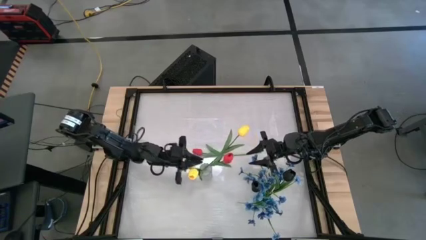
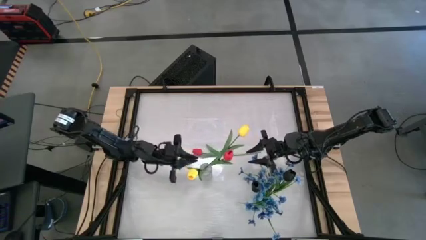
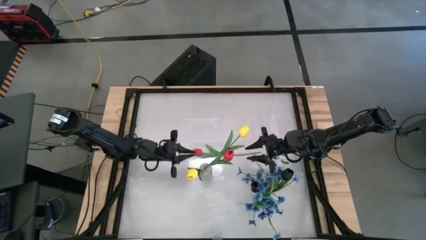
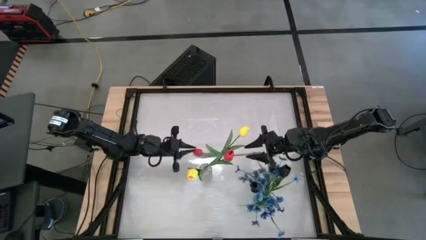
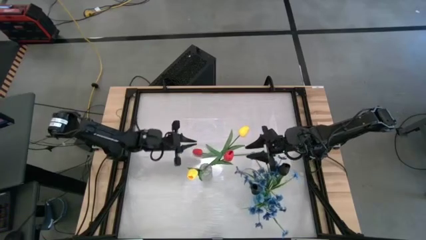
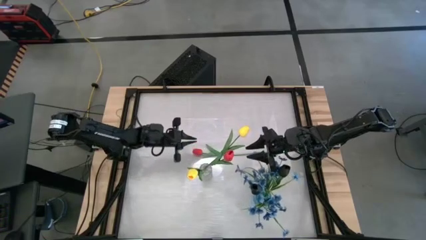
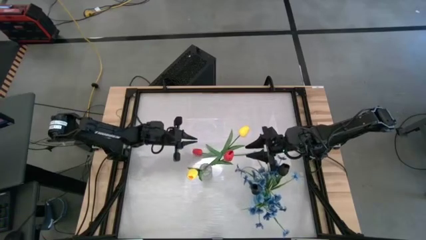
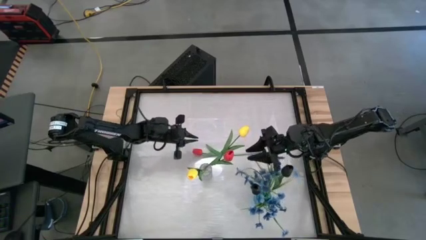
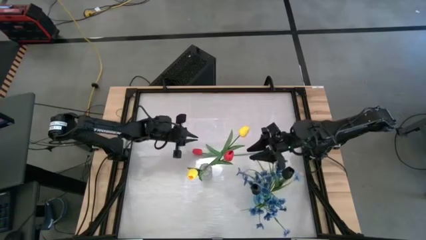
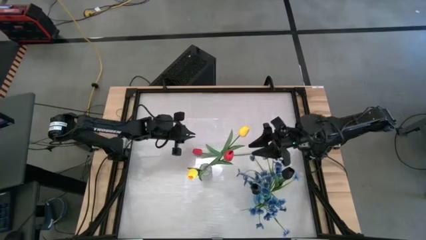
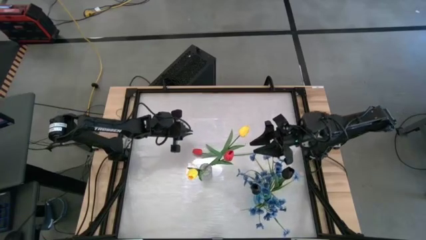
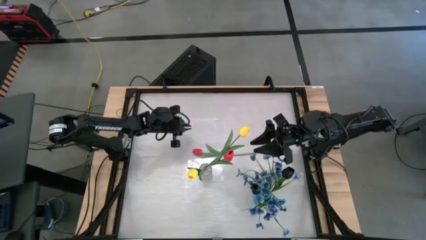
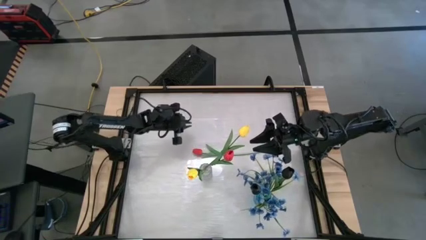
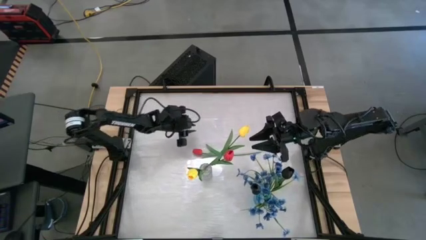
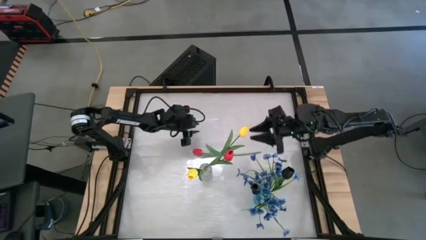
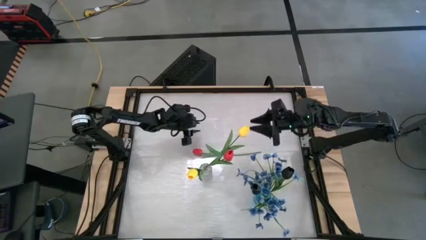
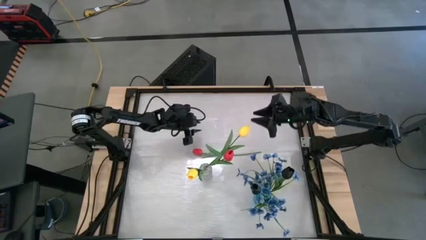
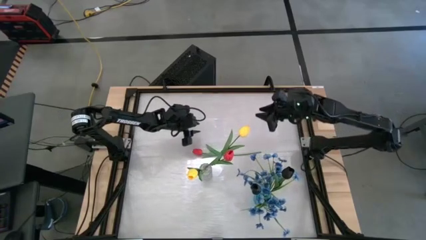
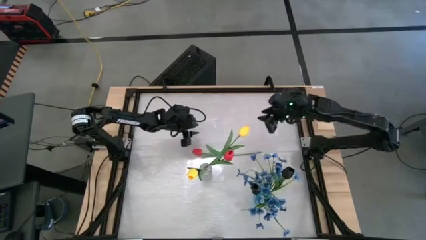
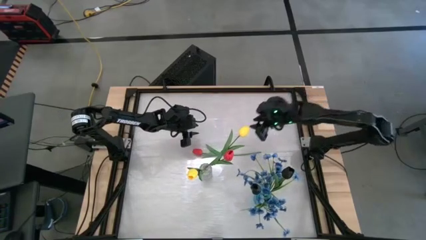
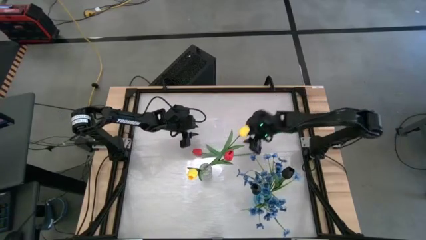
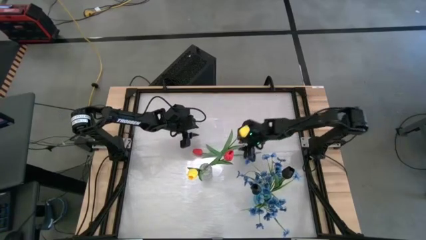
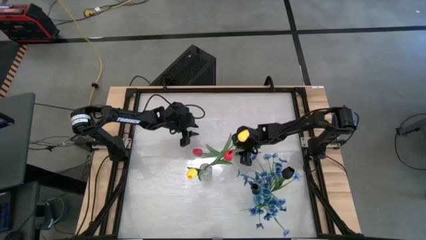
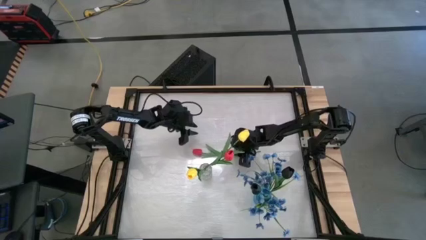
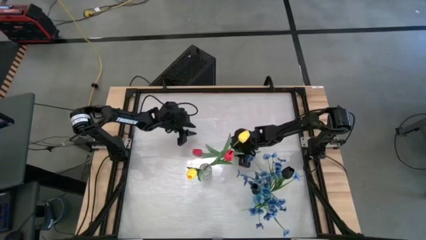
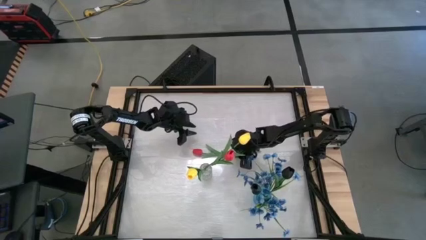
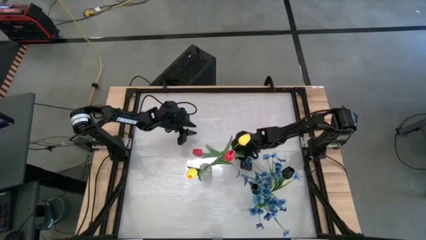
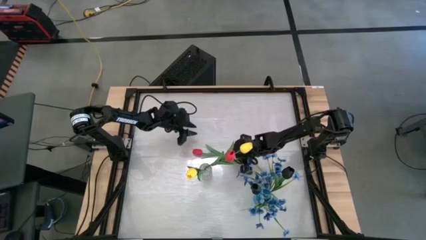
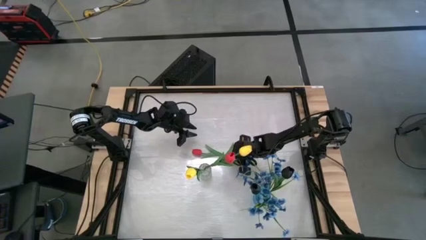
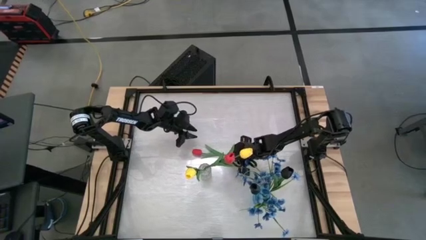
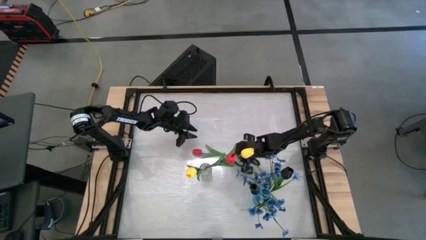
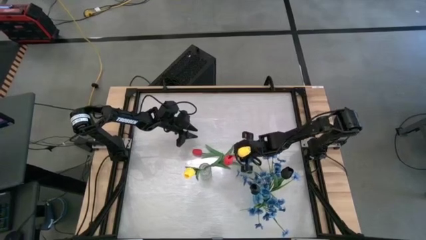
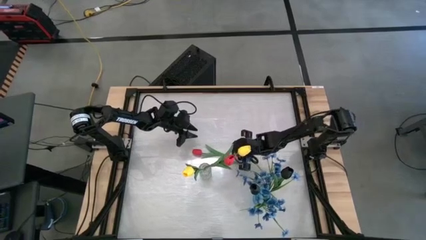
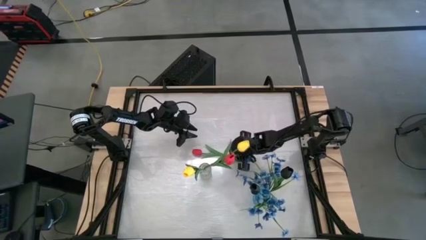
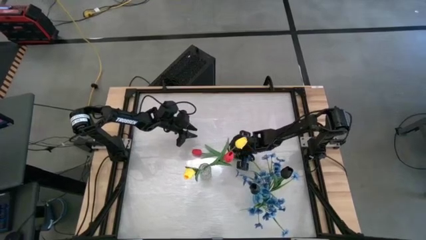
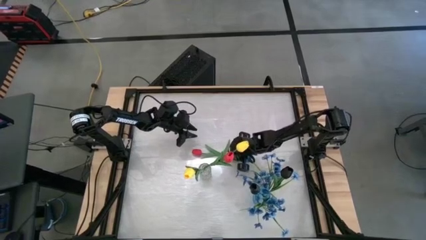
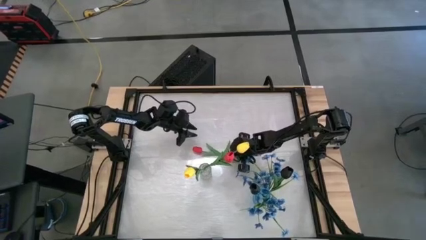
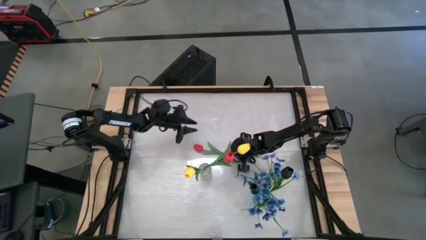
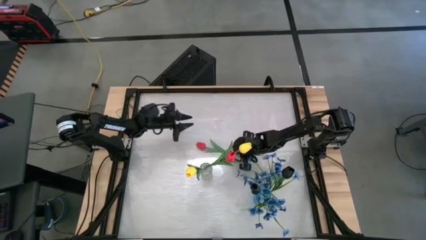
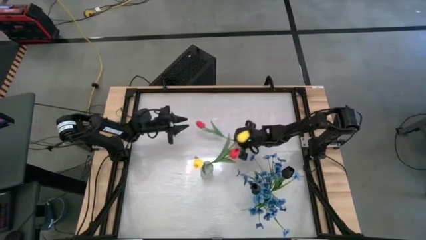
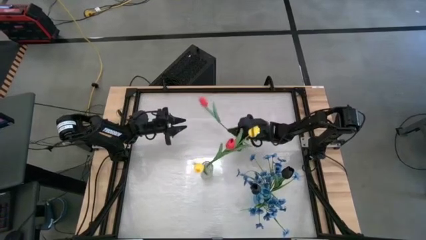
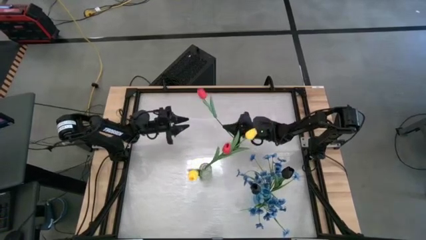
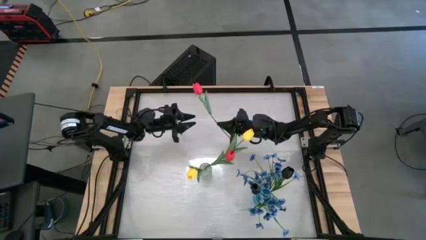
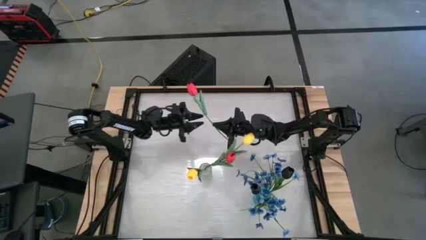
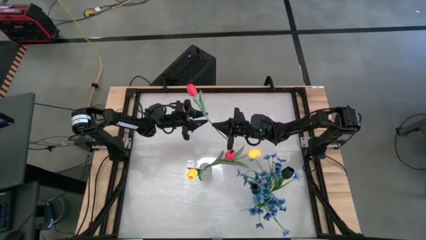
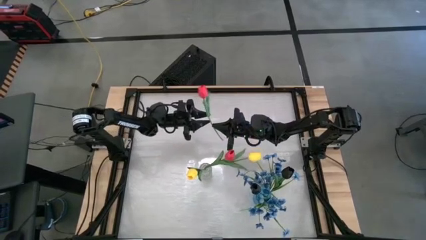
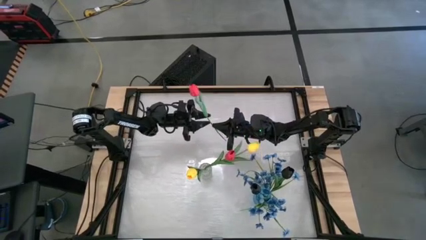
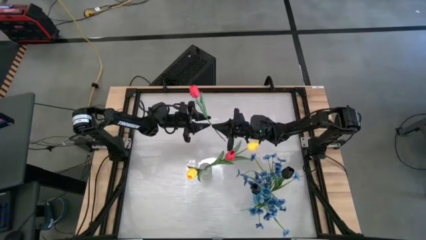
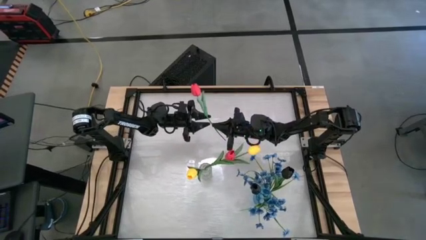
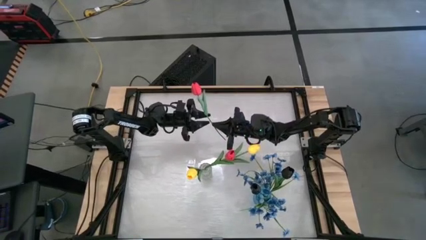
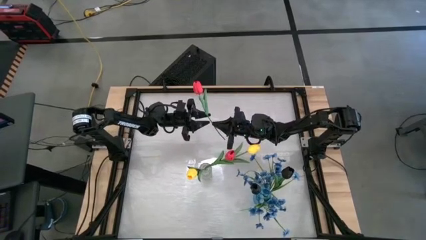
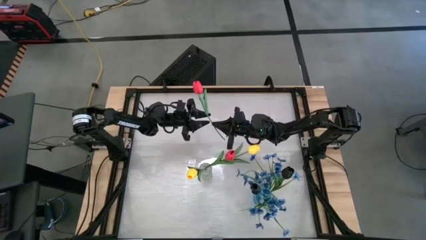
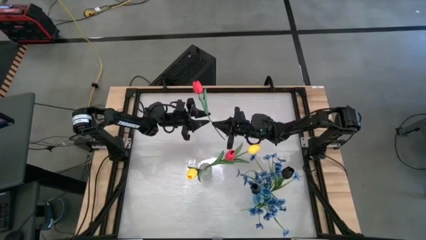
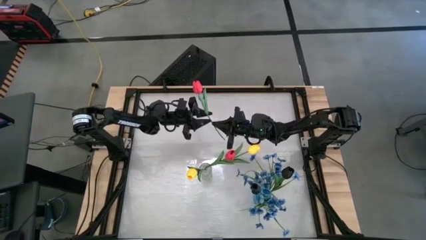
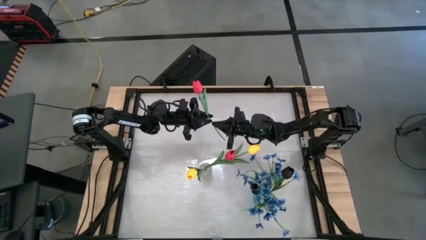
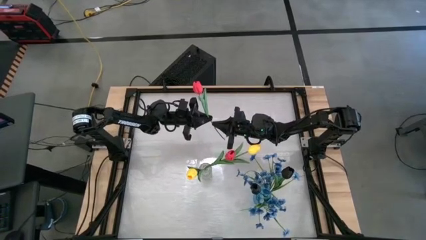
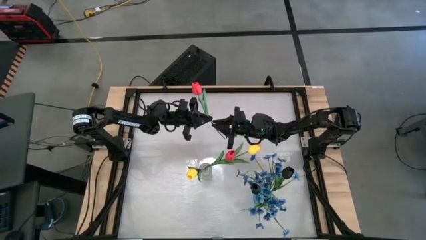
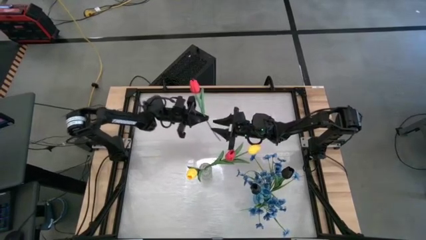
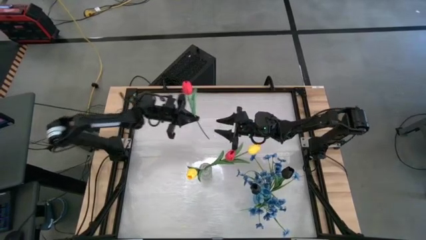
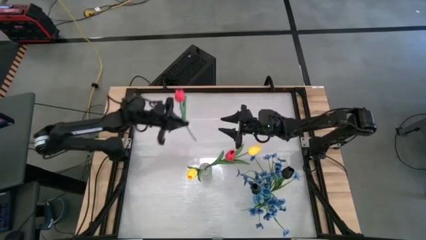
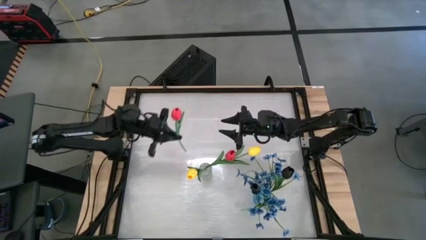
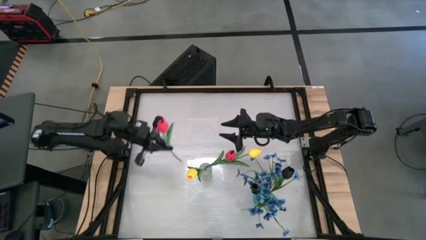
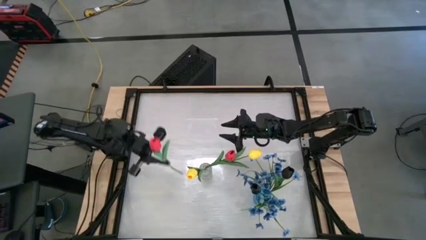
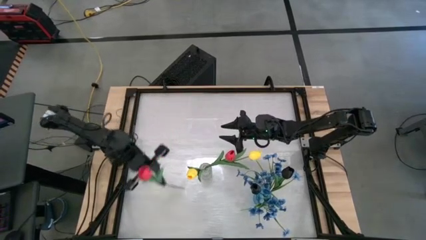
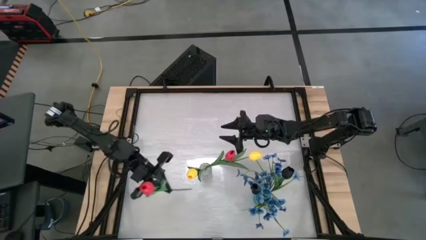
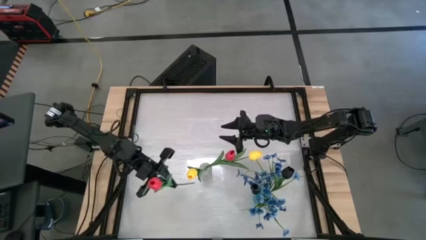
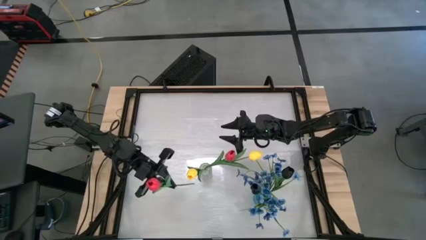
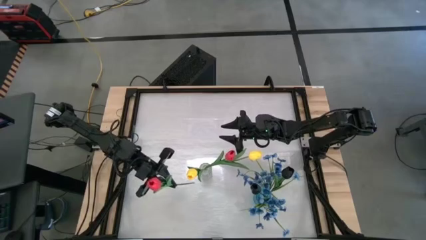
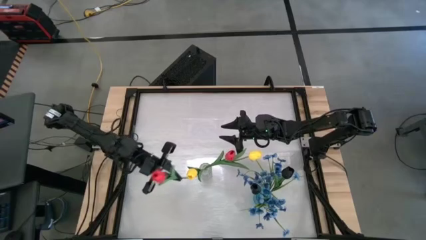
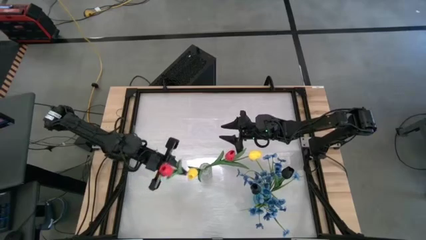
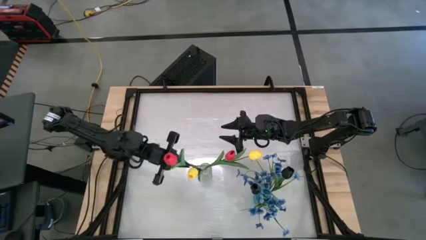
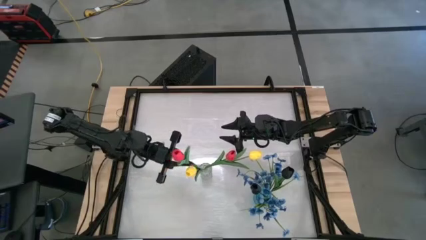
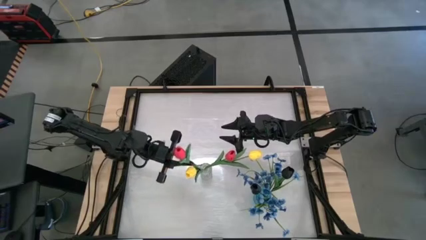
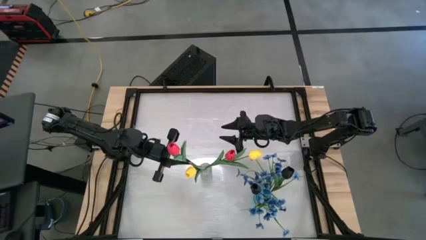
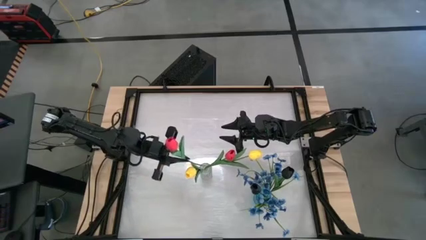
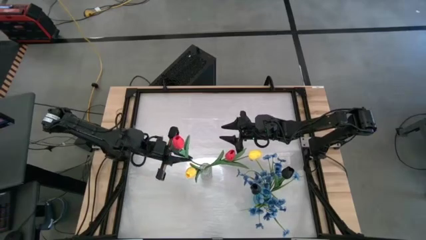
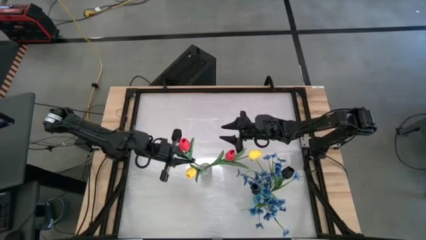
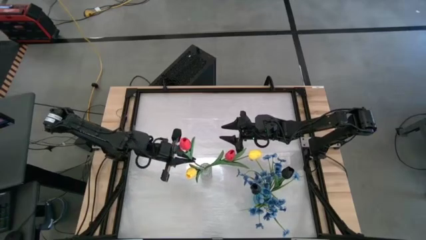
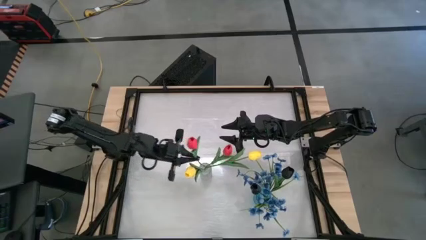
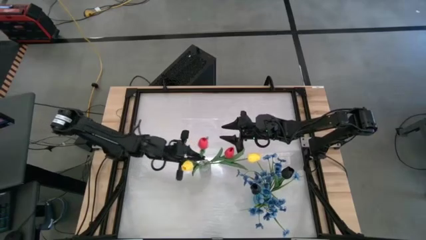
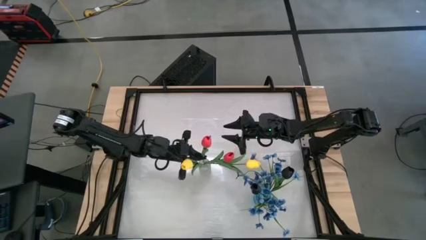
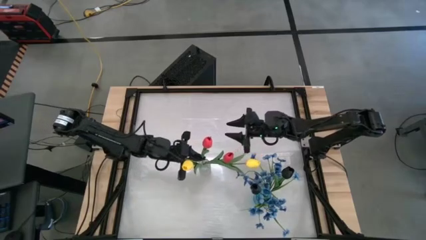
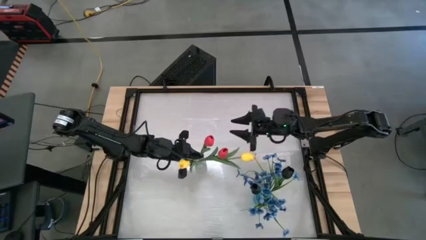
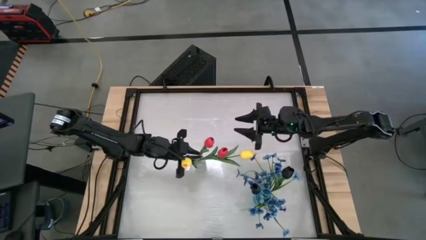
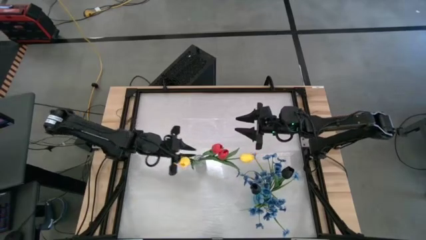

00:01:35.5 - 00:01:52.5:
Task: Sort flowers into vase by color
Put the red flower into the transparent vase
